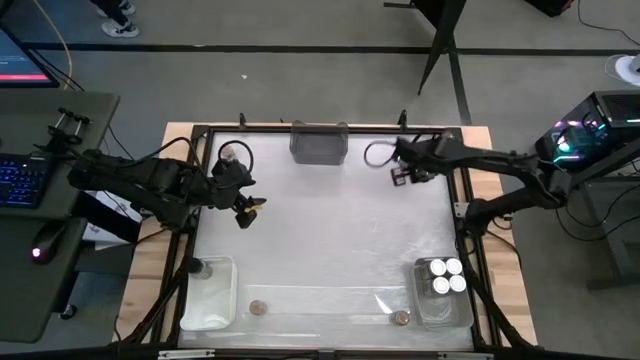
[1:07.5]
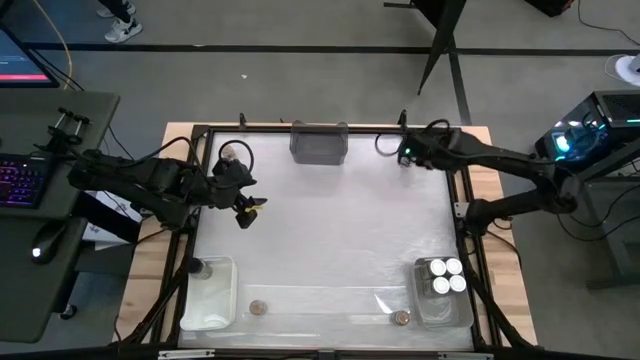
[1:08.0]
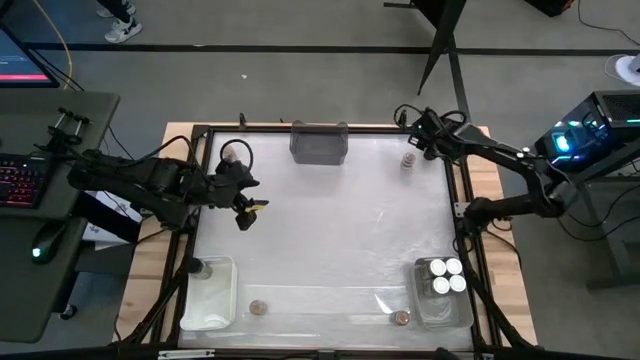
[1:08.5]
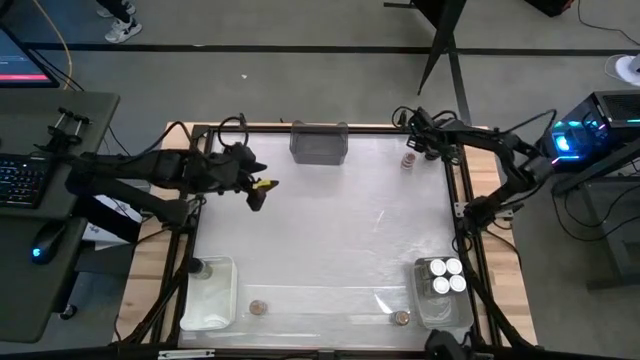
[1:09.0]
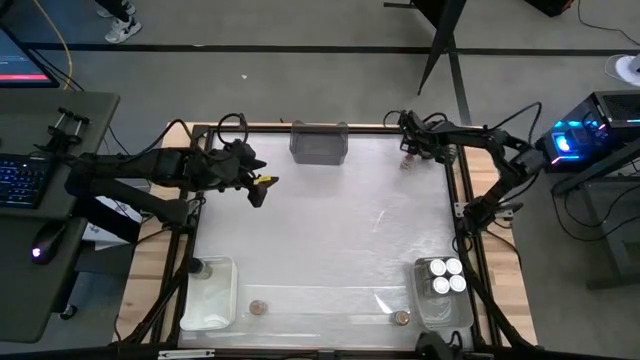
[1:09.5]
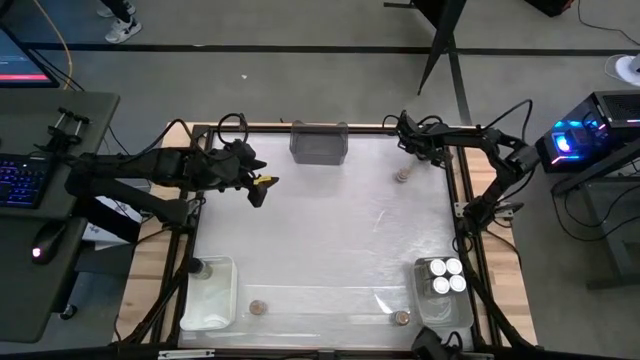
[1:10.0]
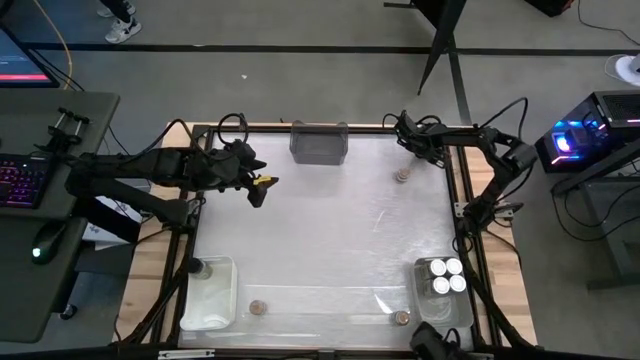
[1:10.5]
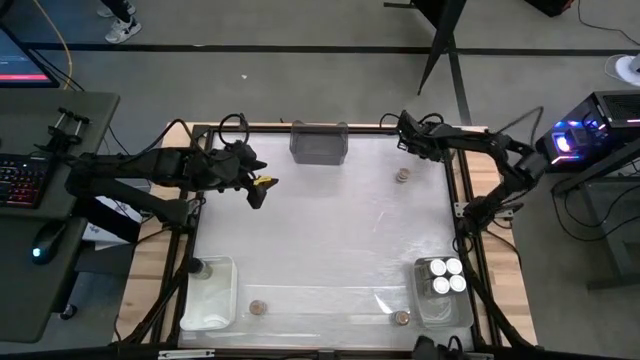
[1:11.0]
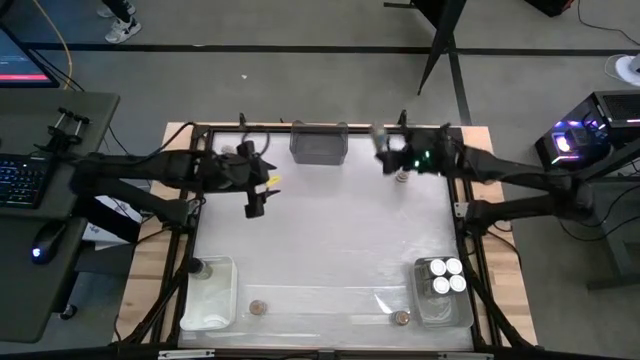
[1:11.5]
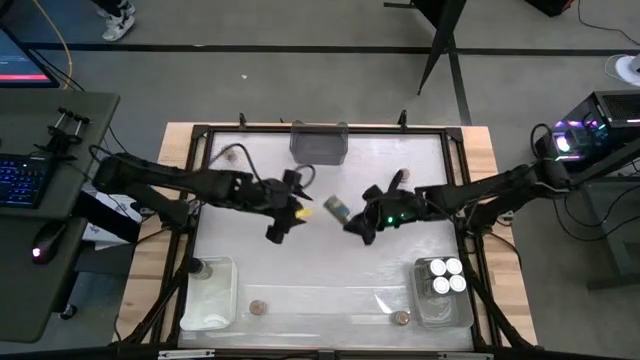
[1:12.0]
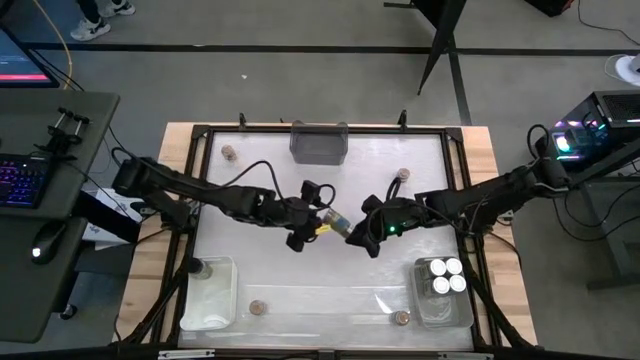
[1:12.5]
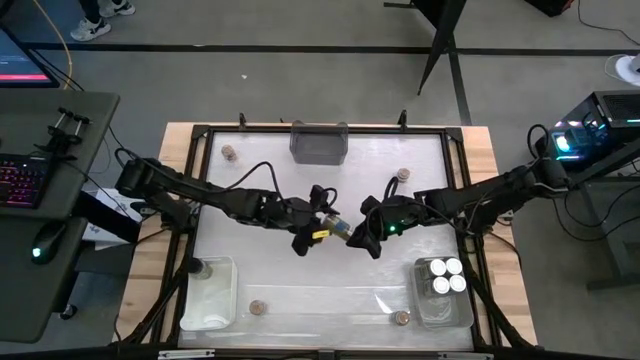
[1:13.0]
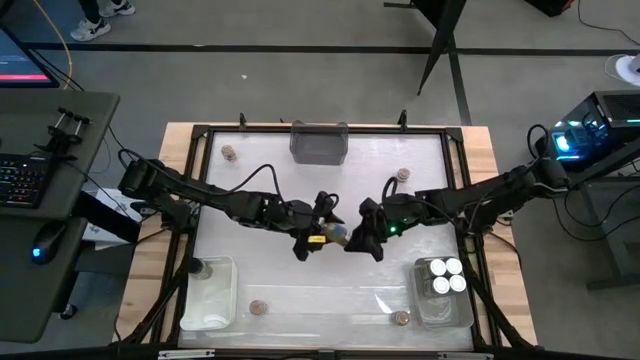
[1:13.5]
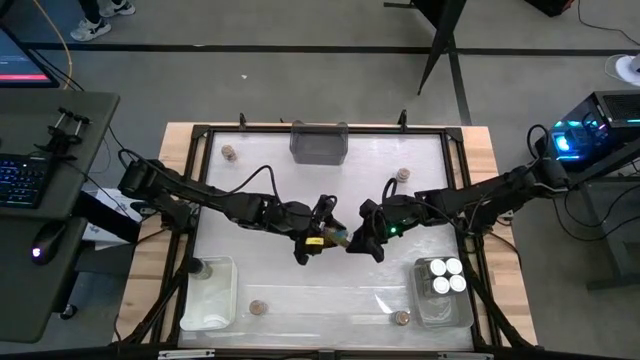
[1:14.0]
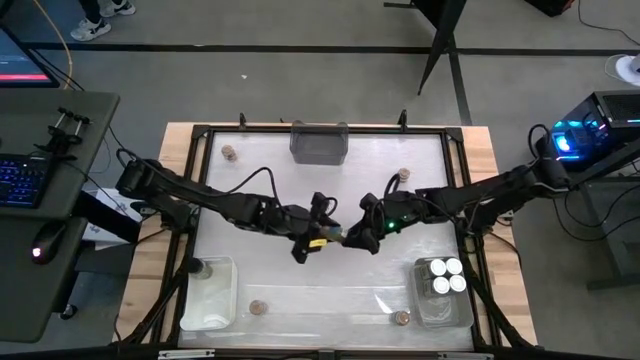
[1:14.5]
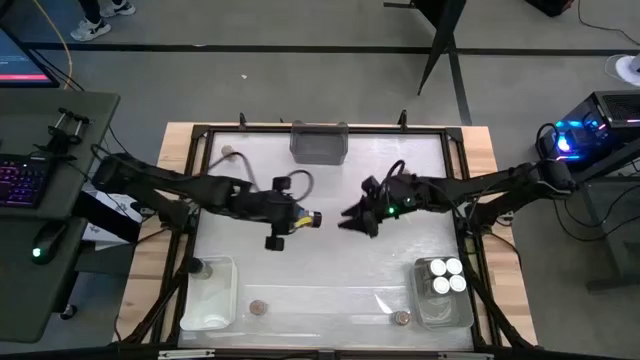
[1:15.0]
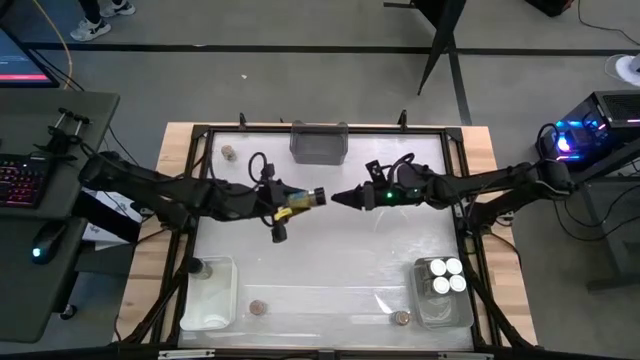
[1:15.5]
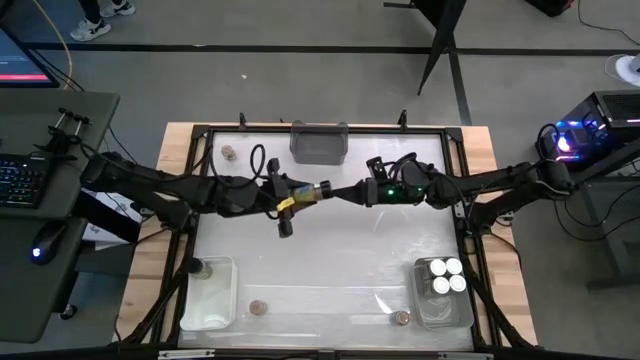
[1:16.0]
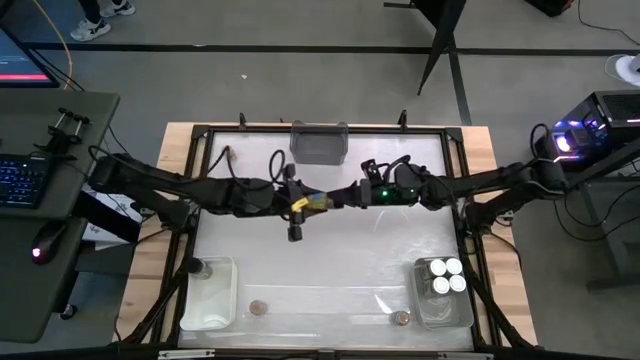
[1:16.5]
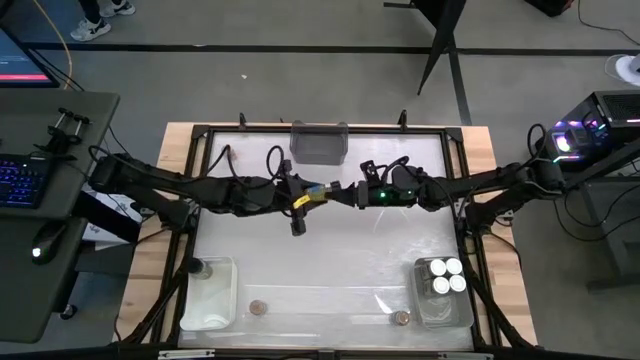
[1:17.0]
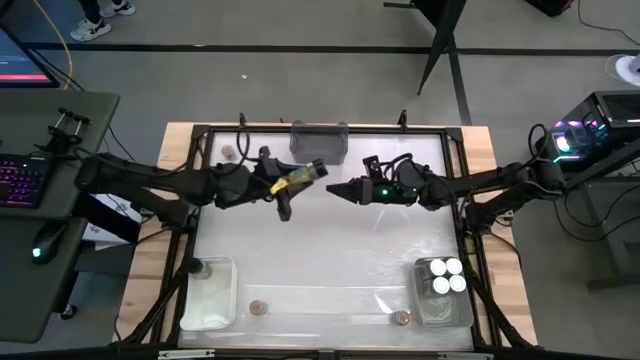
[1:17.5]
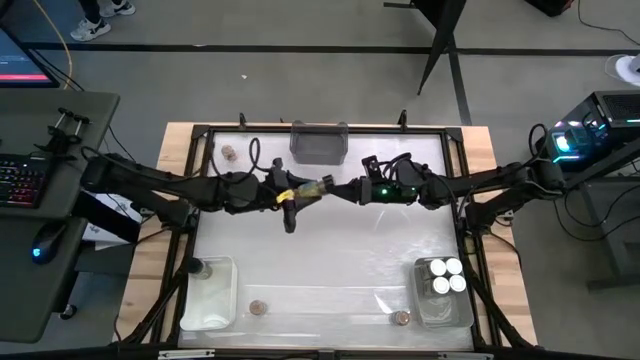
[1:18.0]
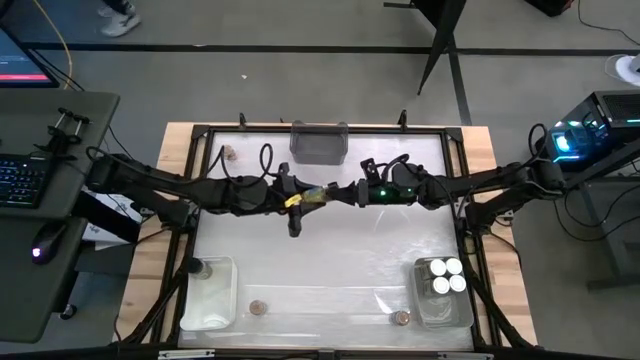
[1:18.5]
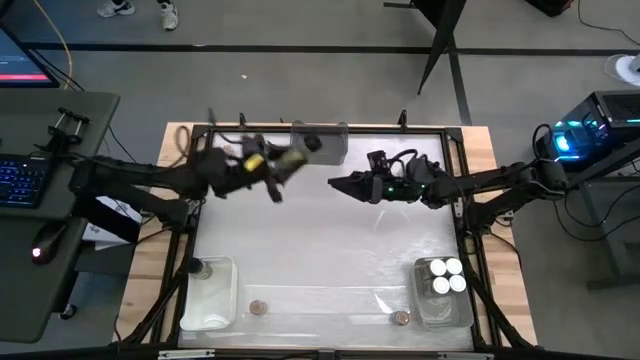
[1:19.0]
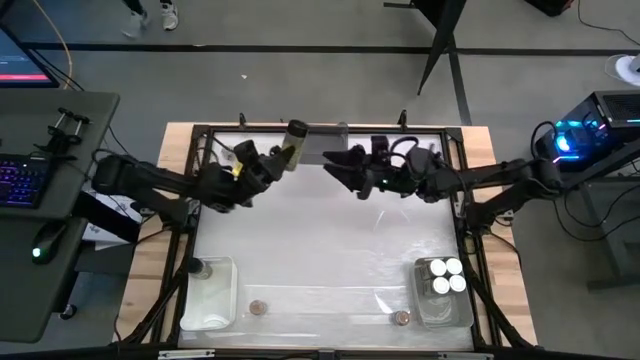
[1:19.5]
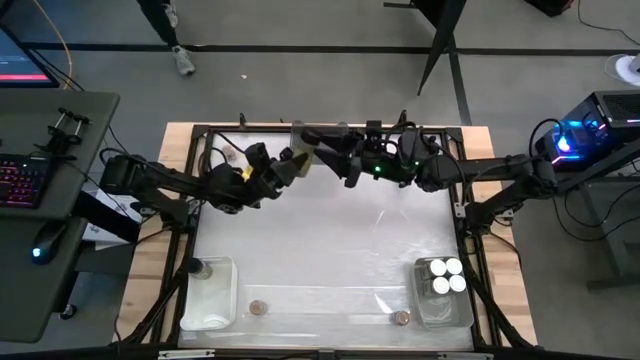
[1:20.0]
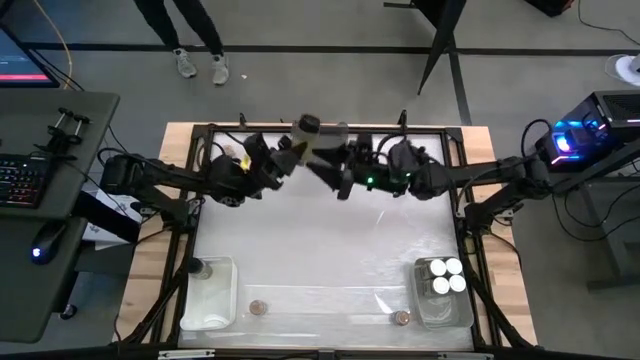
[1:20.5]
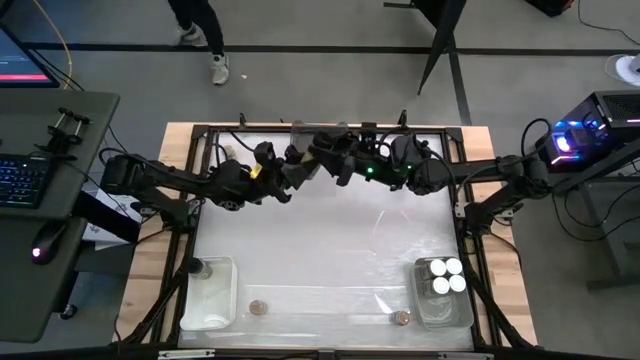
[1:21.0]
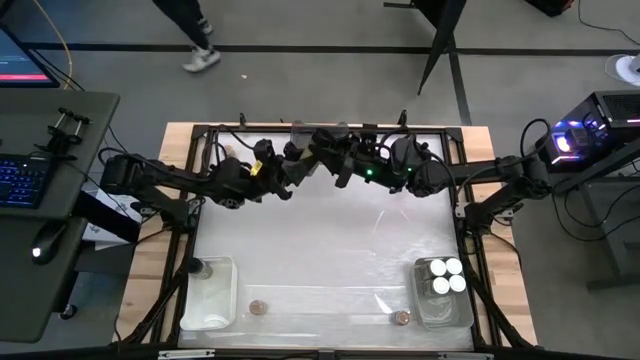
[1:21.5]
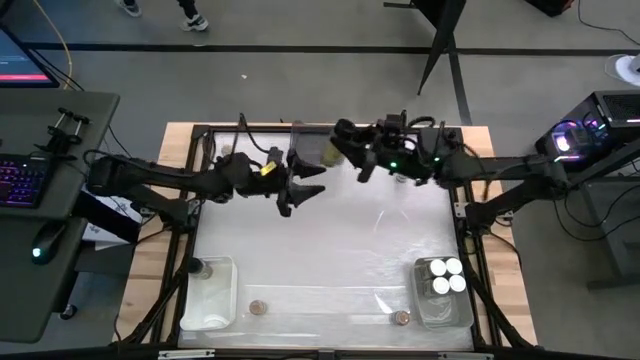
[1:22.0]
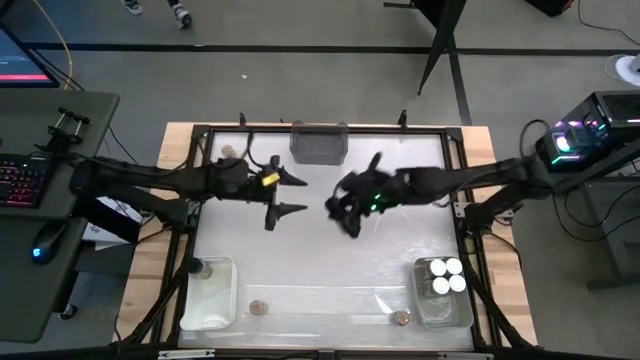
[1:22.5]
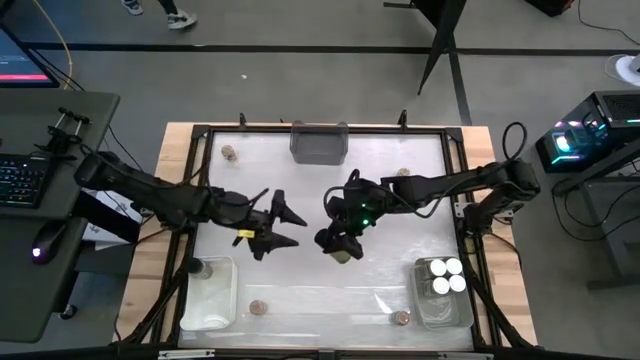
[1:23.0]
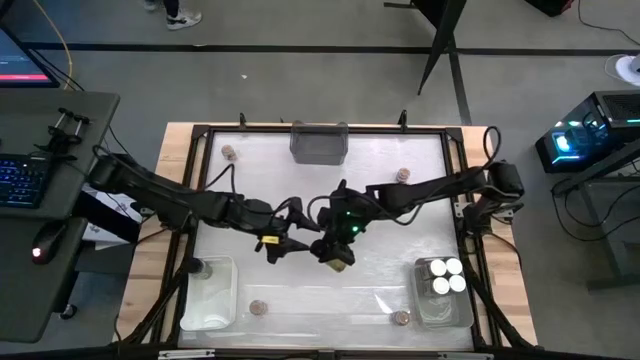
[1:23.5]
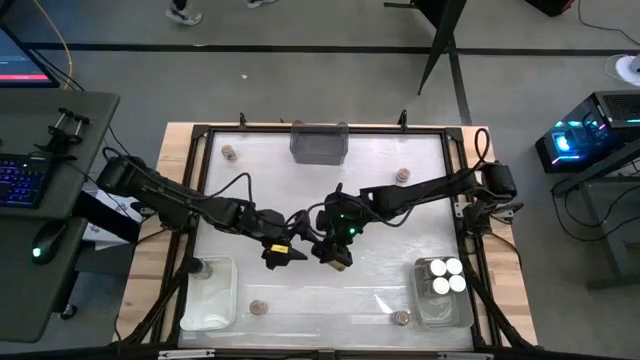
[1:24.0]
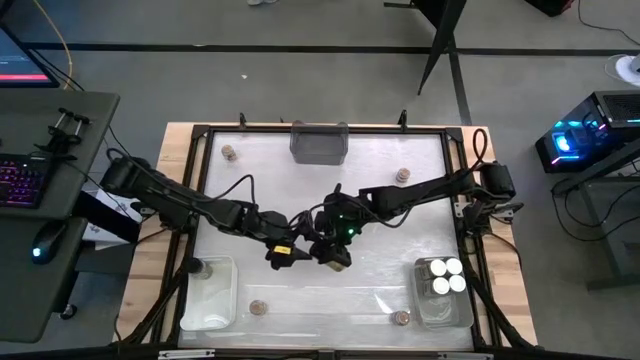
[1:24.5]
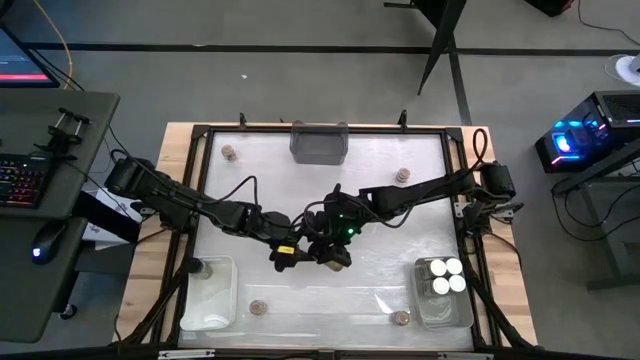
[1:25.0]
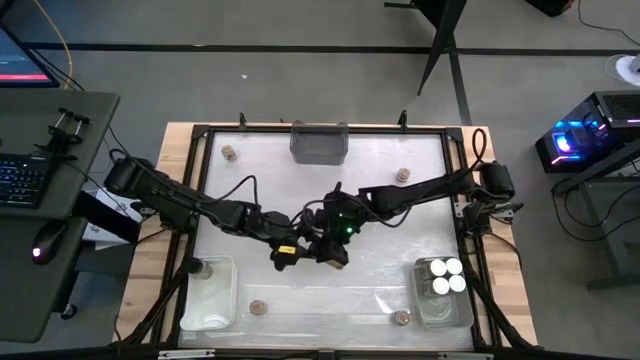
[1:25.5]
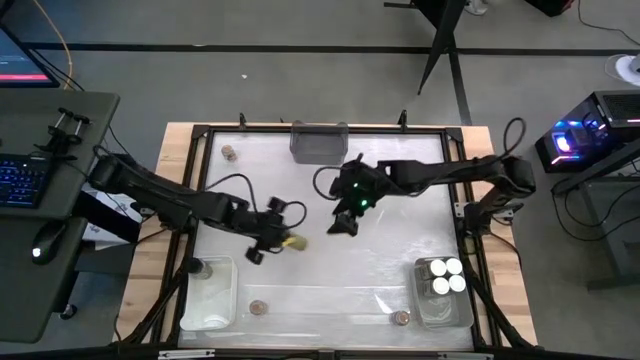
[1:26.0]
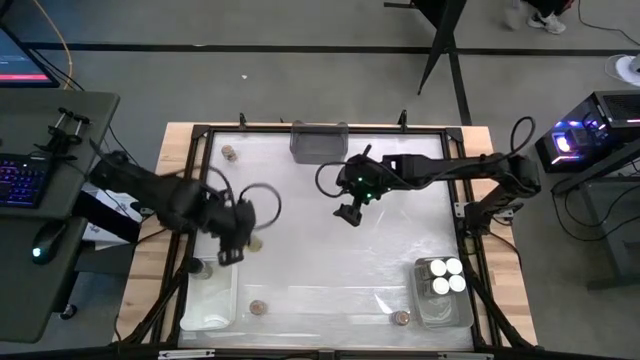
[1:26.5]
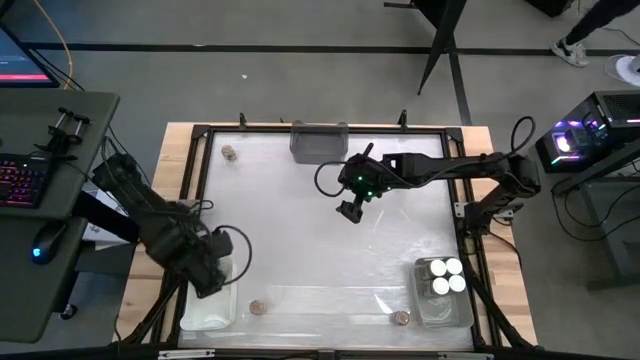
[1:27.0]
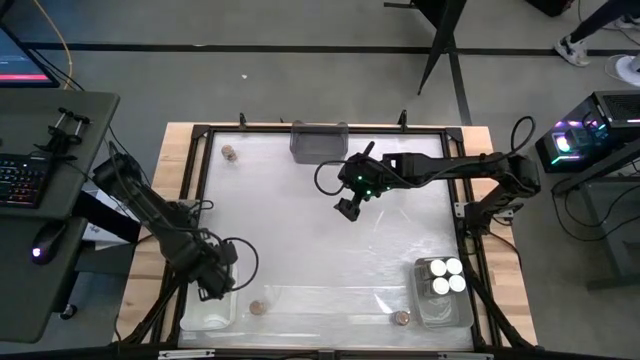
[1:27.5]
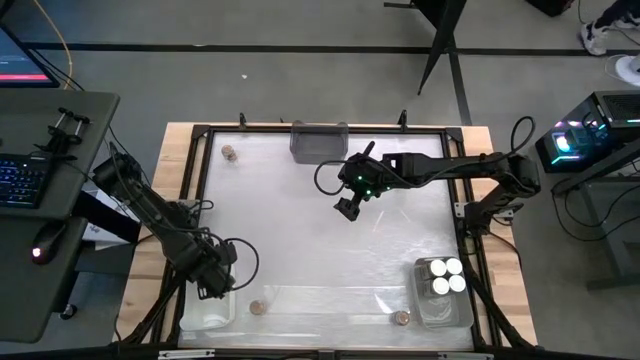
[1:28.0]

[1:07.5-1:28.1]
Task: Sort spices by type
Put the black seasoning bottle into the white bin
